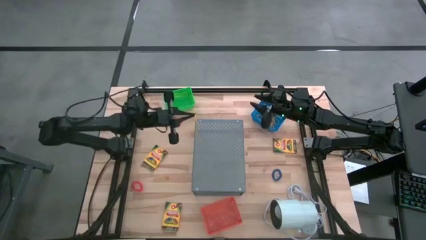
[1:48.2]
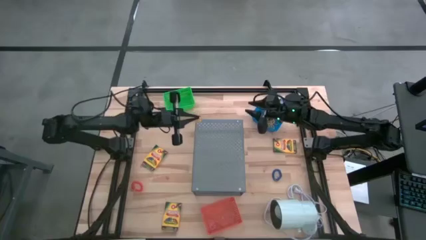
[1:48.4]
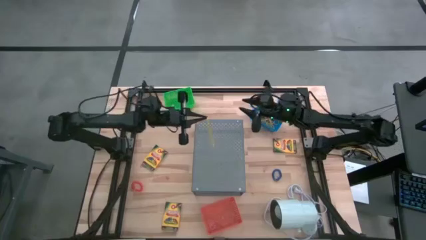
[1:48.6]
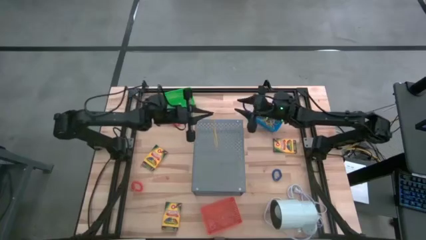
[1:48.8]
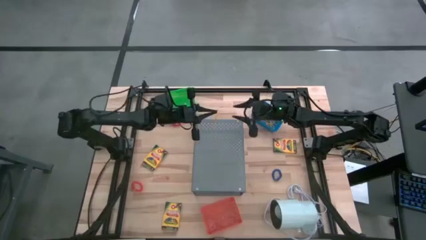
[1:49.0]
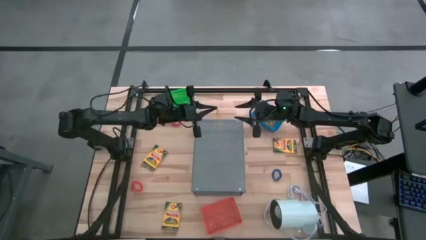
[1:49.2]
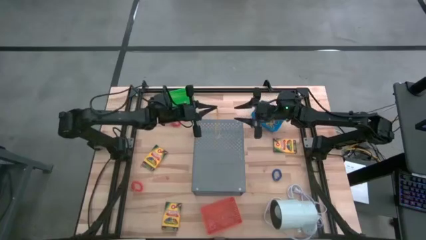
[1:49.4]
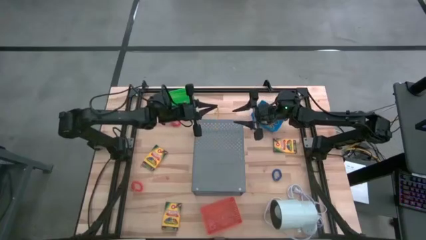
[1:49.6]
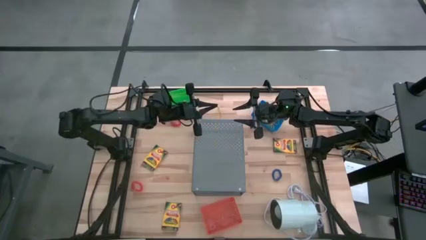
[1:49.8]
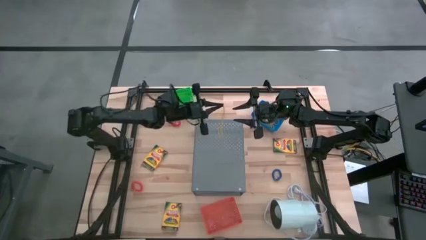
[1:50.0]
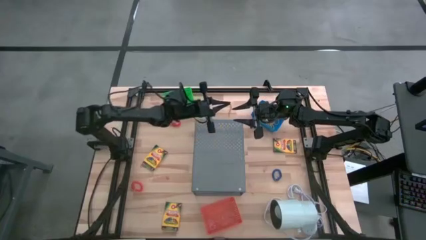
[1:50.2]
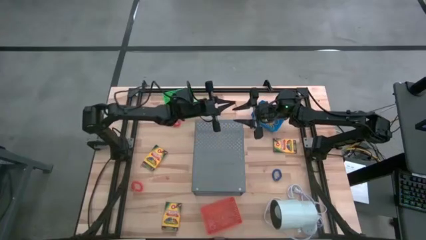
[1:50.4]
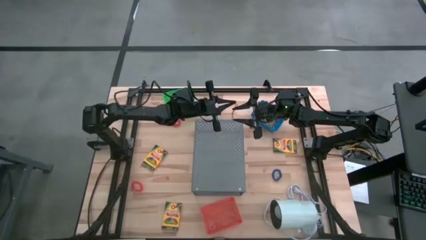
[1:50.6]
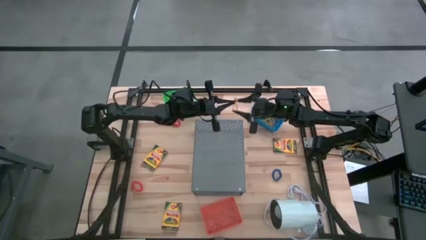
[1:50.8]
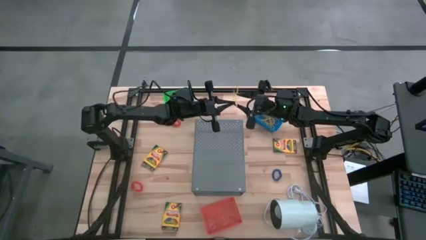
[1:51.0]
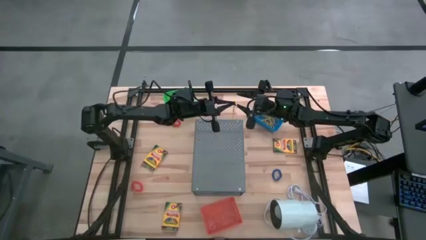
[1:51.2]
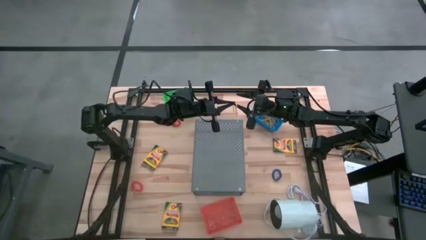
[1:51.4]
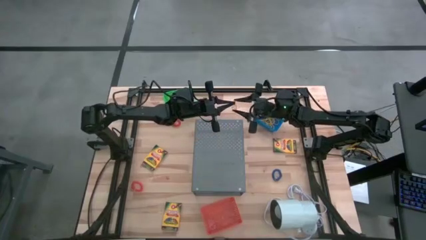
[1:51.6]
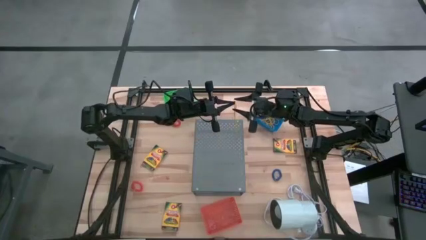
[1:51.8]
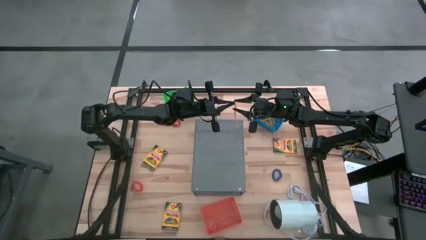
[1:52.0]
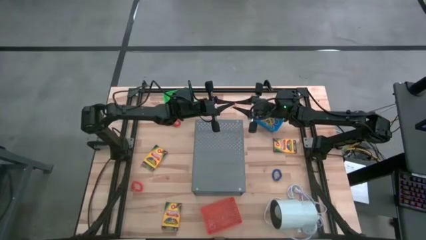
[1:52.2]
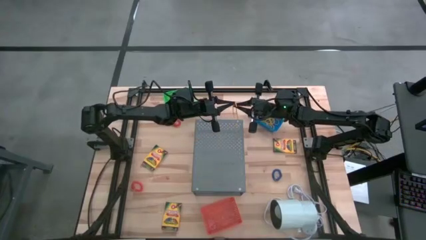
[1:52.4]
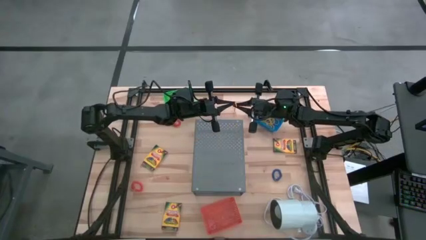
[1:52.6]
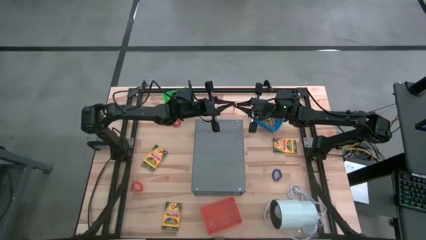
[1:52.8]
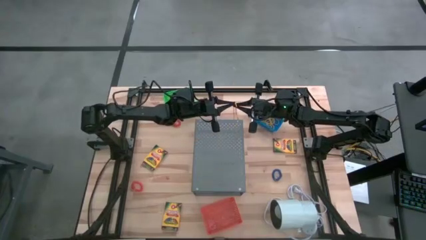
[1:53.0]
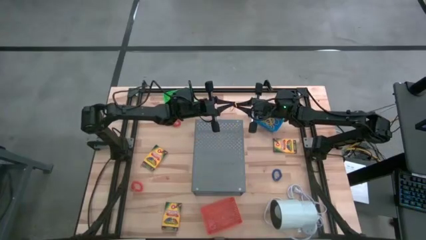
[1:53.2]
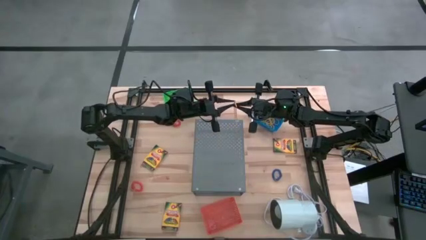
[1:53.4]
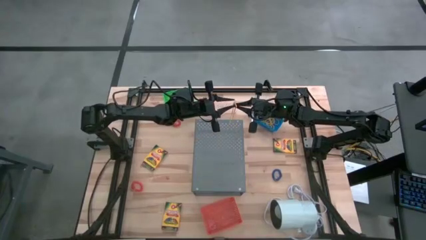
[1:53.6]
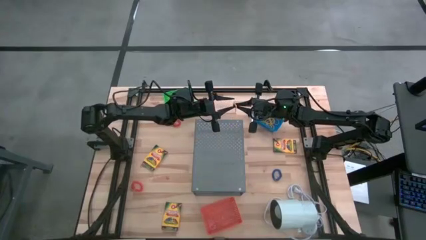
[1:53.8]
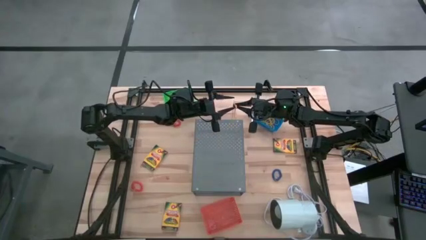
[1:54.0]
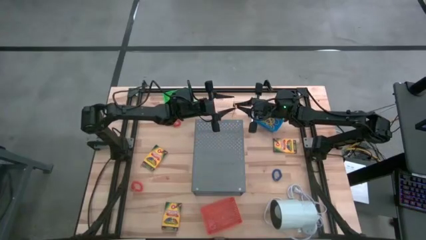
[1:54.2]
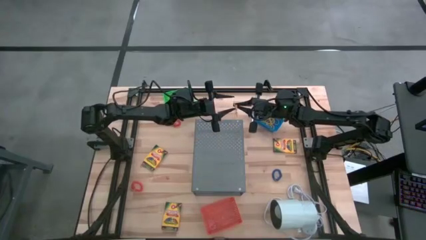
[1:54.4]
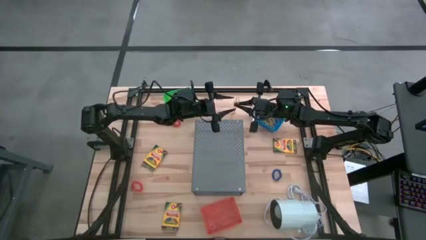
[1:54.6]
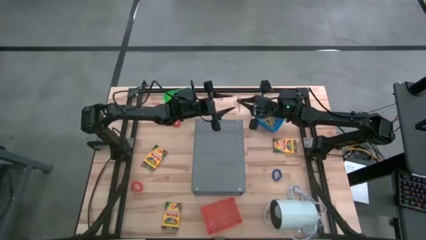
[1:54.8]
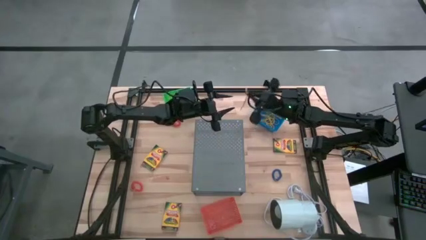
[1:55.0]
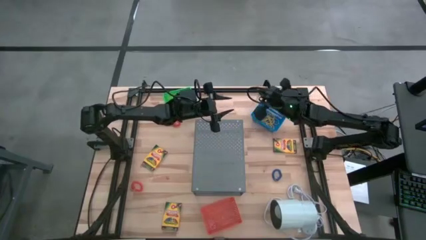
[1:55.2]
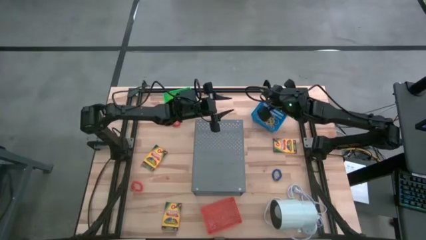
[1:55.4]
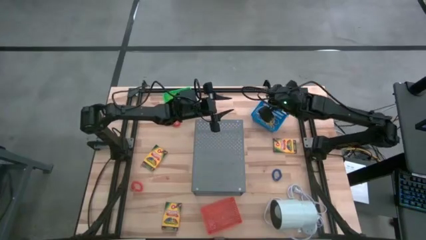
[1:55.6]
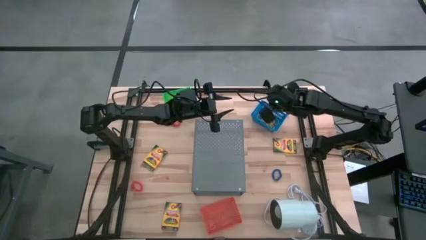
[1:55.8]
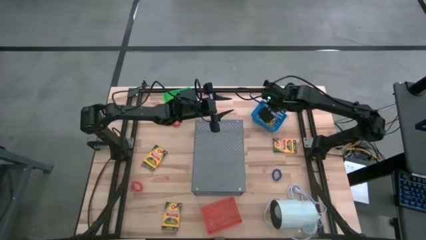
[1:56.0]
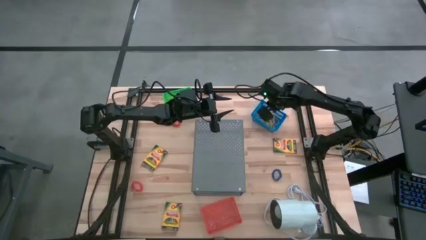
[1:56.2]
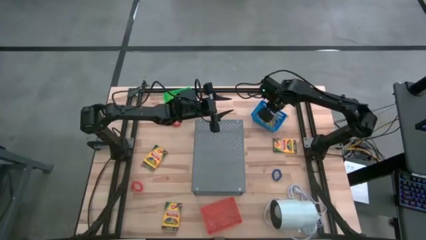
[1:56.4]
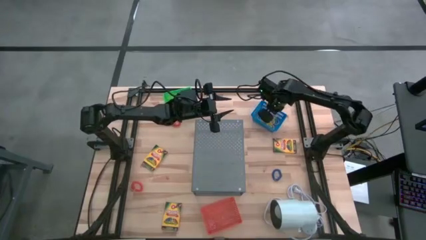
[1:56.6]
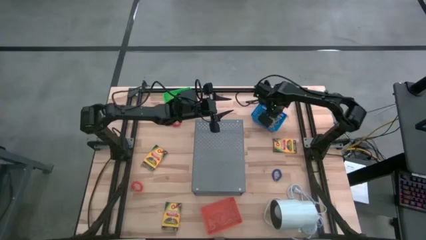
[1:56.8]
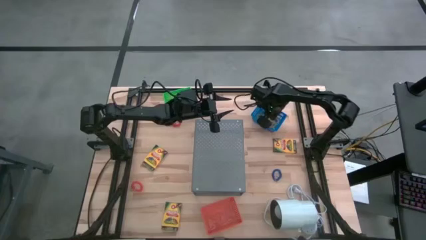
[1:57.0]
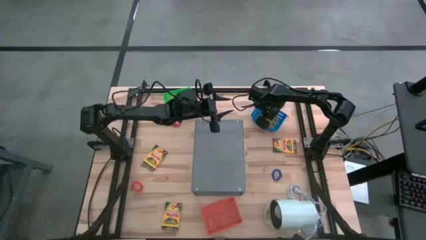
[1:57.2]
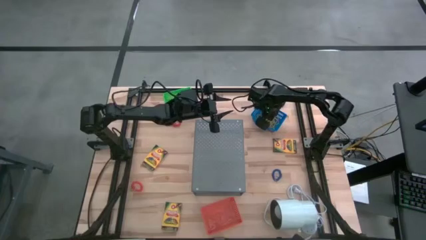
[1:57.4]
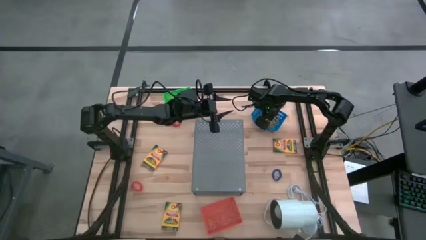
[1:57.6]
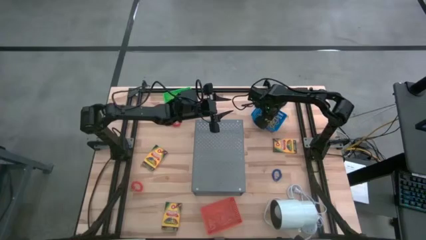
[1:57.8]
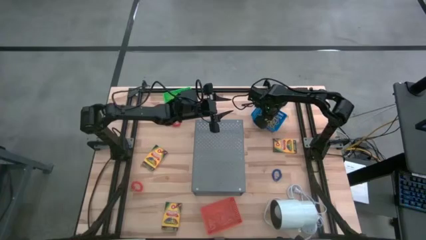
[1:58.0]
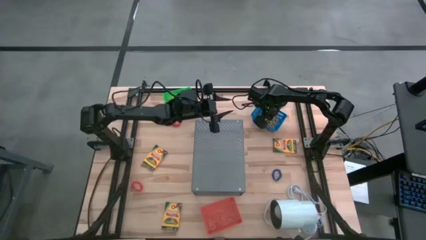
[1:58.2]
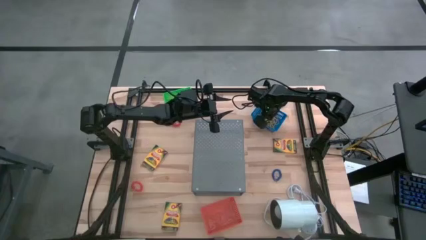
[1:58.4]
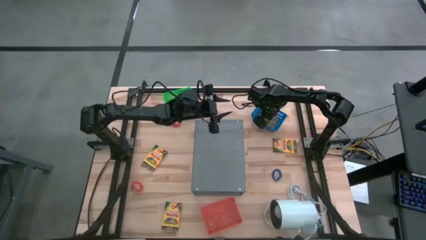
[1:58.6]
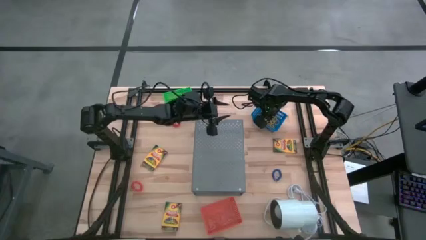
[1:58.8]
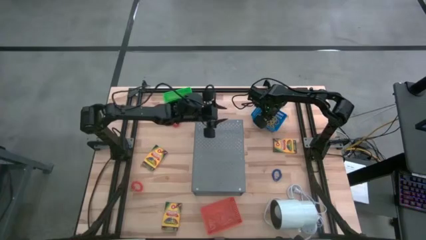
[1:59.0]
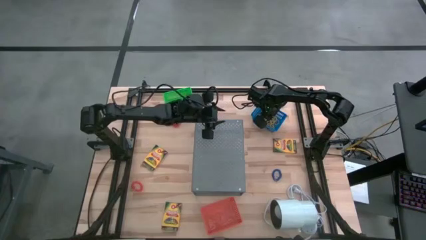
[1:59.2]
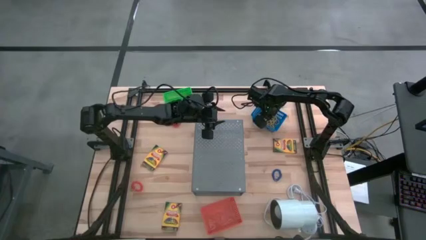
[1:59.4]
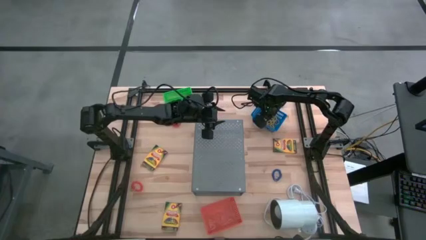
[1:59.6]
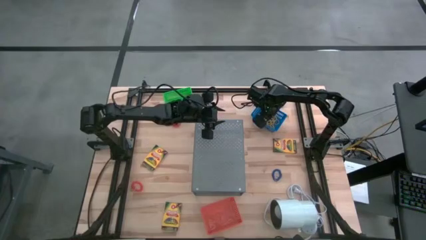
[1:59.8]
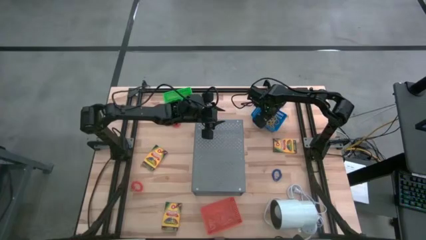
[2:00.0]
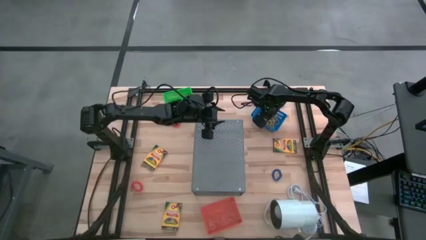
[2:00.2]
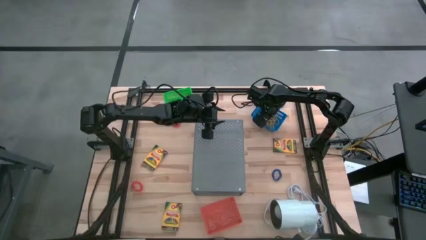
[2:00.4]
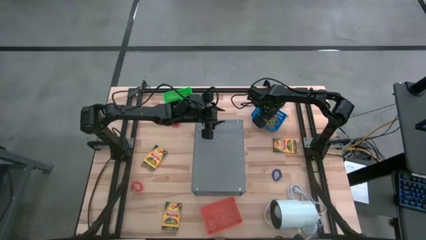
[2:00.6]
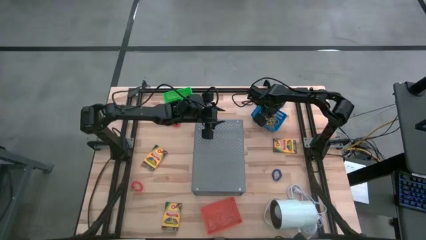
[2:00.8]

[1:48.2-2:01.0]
Task: Pick & Place Office Desk Supplies
Put the yellow rubber band into the blue basket

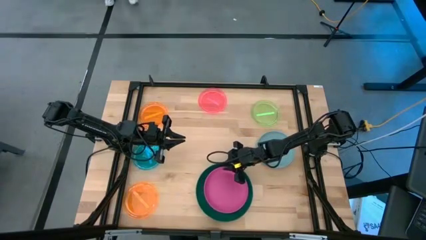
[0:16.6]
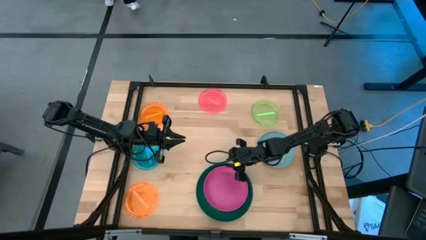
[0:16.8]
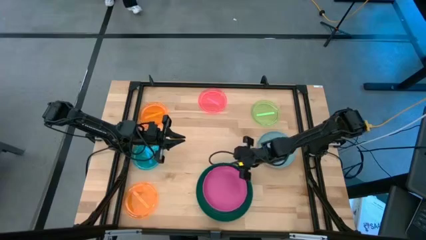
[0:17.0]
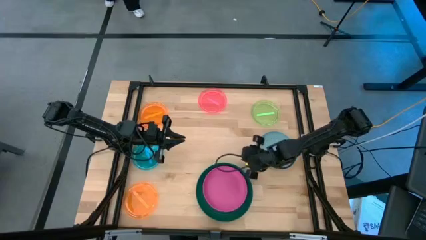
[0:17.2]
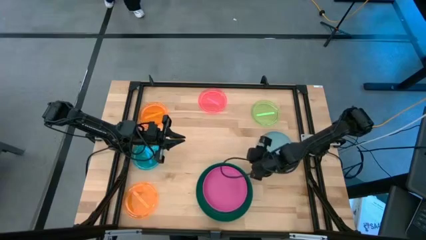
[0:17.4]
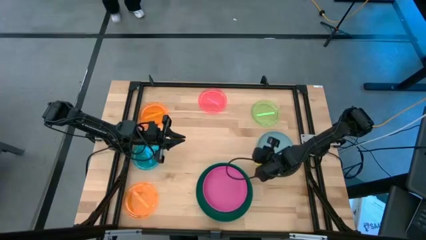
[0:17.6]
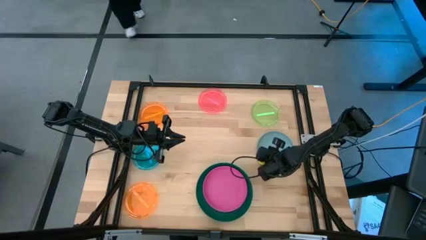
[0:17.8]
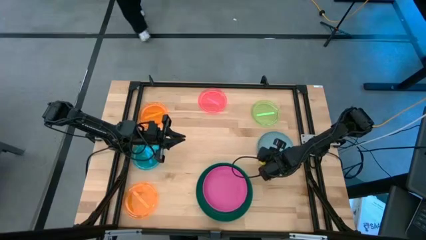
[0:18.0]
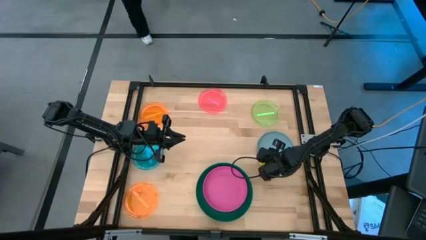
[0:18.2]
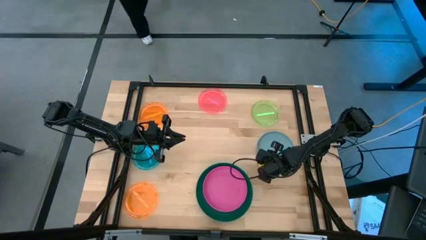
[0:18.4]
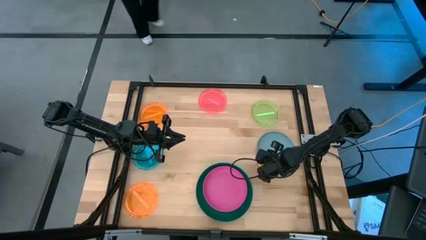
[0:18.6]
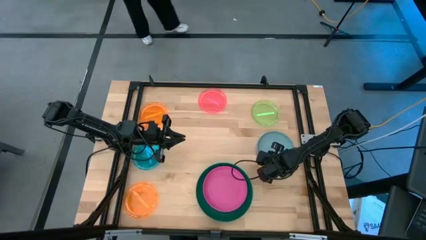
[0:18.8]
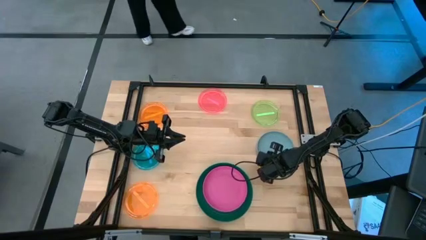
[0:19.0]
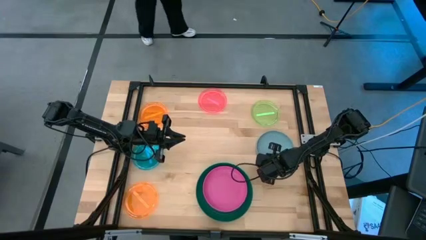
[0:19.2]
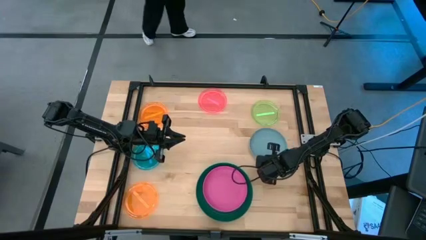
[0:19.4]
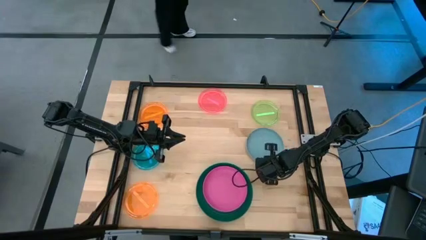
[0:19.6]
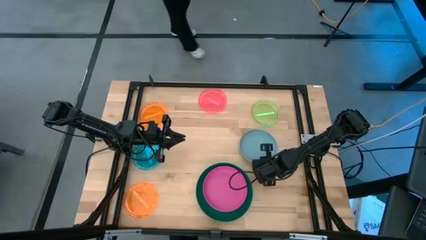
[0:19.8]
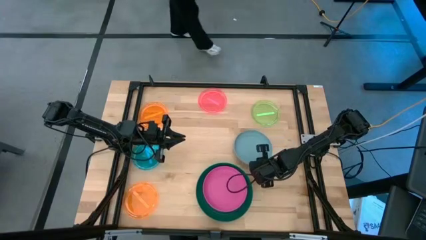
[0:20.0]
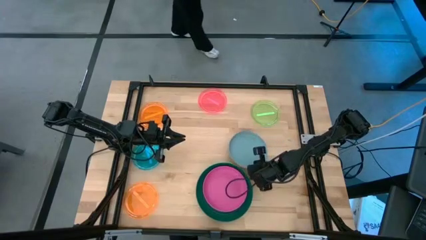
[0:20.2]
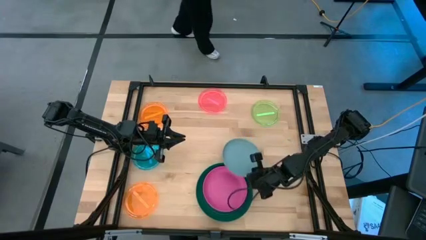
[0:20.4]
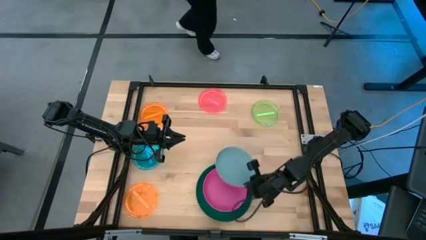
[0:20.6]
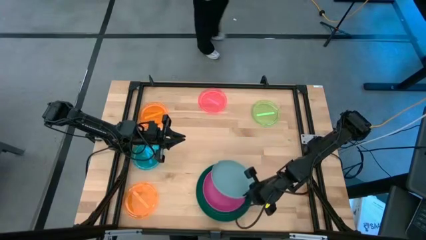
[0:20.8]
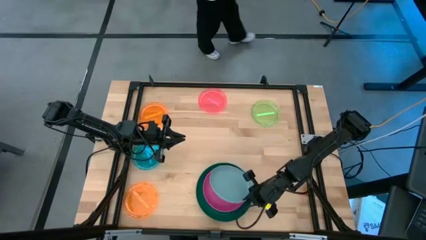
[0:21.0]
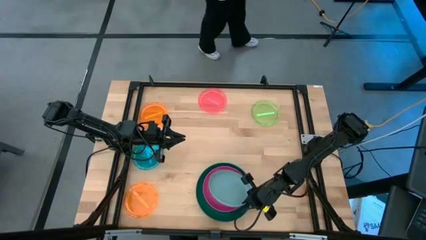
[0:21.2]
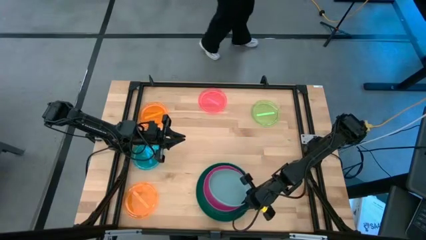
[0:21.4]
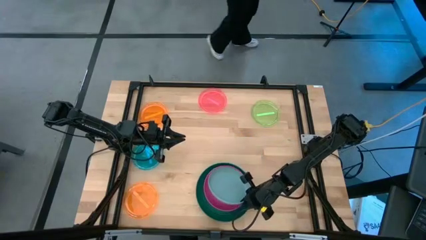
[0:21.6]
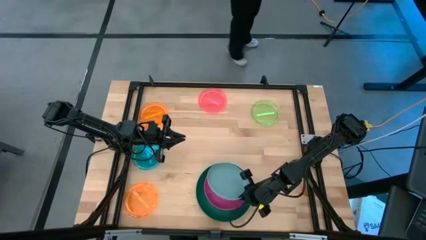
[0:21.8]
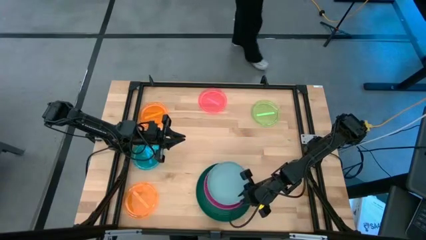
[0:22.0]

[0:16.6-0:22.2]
Task: Stack plastic plates
Stack the light blue plate on top of the pink plate
